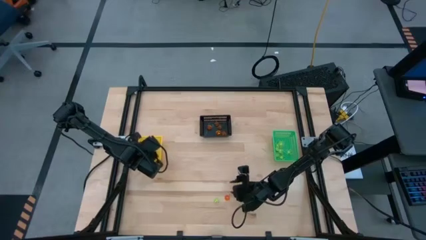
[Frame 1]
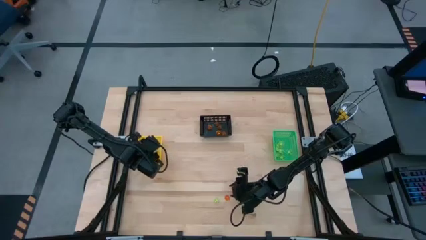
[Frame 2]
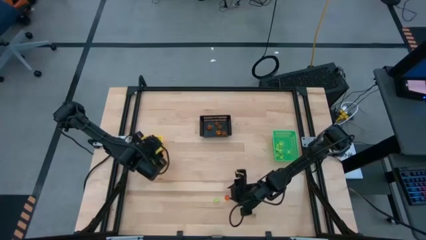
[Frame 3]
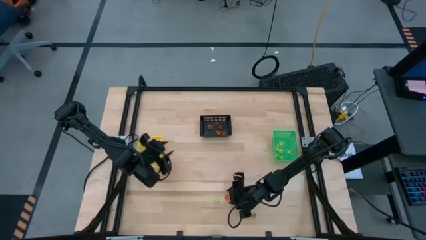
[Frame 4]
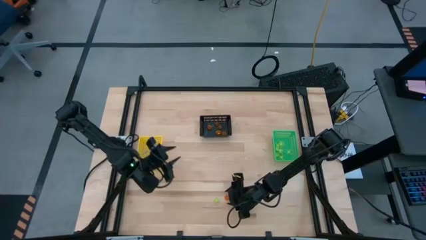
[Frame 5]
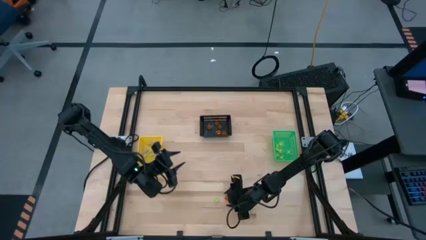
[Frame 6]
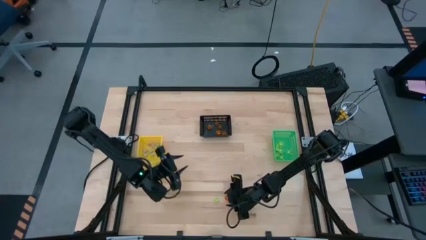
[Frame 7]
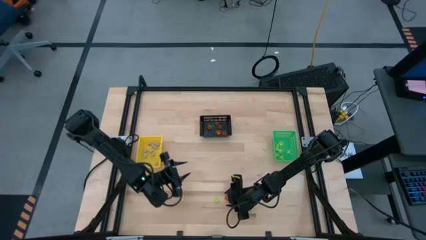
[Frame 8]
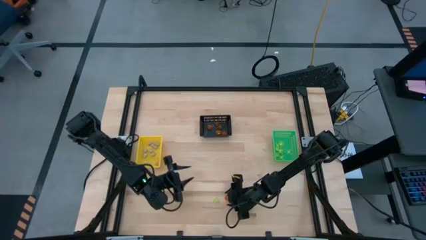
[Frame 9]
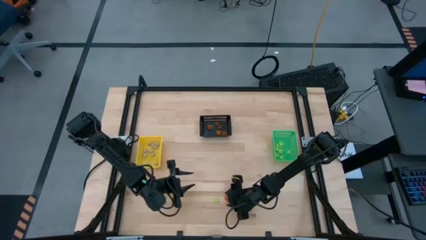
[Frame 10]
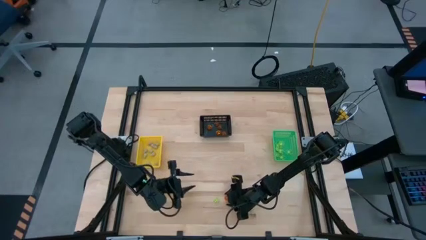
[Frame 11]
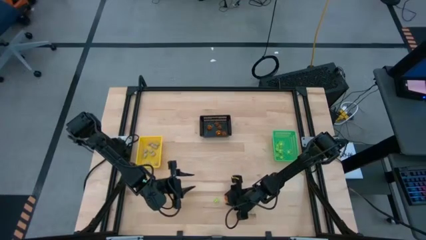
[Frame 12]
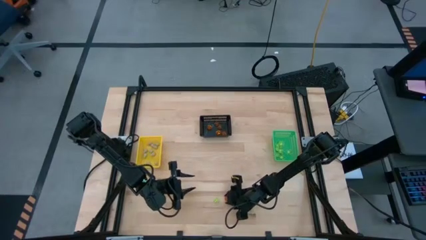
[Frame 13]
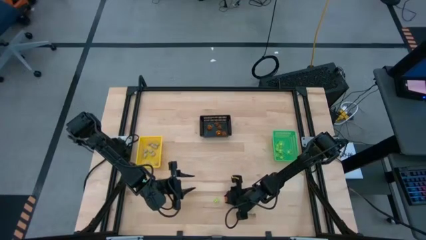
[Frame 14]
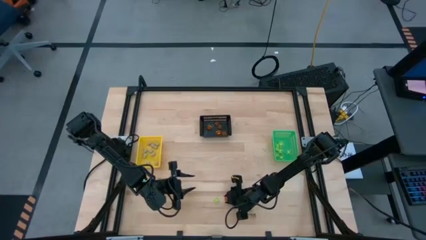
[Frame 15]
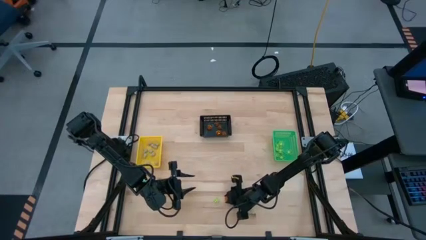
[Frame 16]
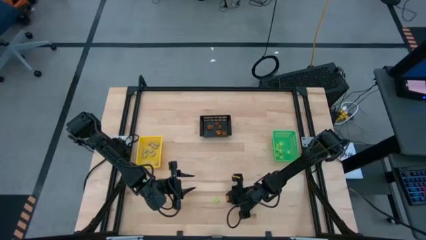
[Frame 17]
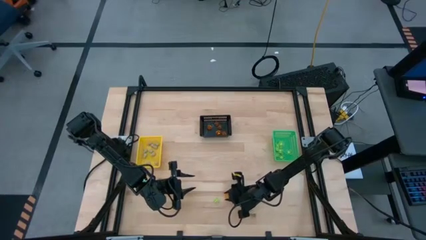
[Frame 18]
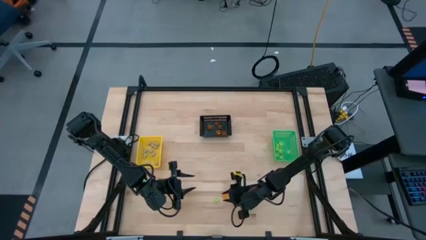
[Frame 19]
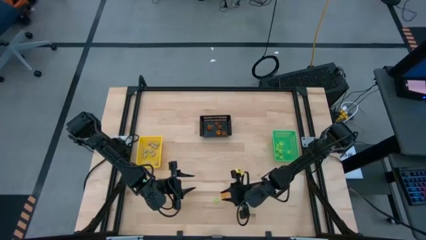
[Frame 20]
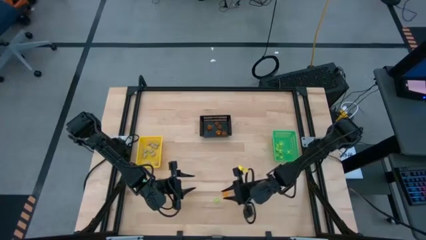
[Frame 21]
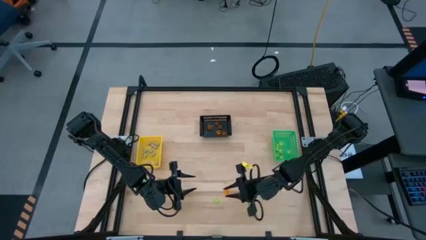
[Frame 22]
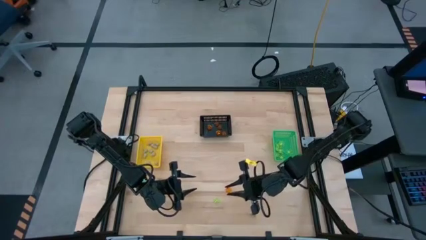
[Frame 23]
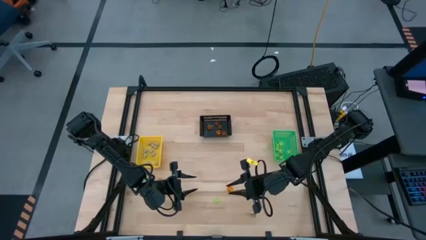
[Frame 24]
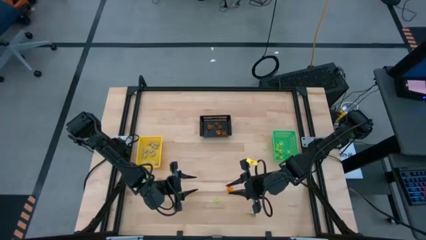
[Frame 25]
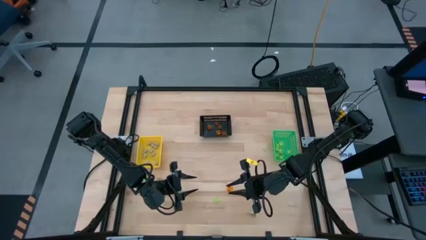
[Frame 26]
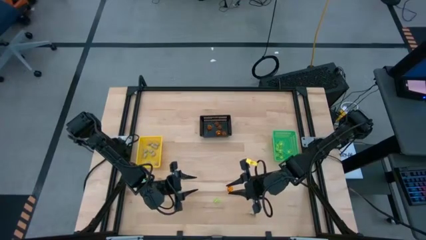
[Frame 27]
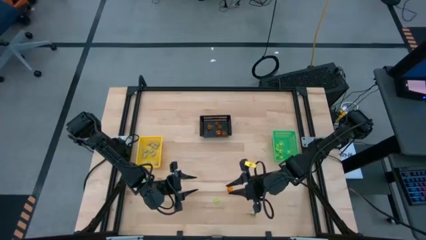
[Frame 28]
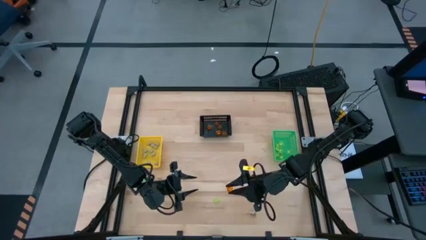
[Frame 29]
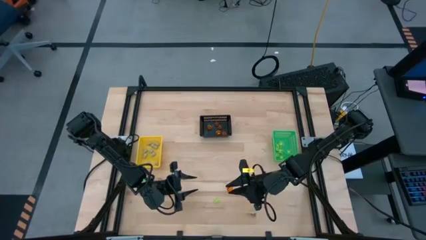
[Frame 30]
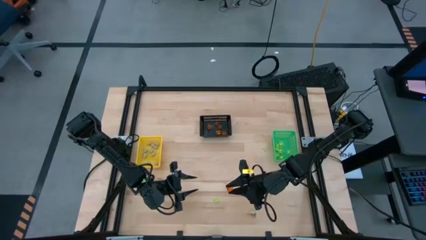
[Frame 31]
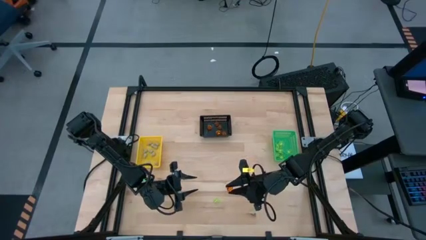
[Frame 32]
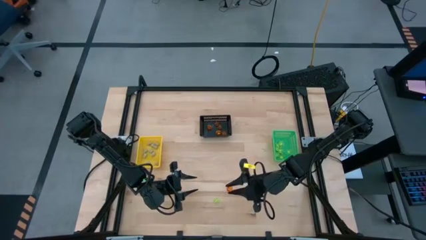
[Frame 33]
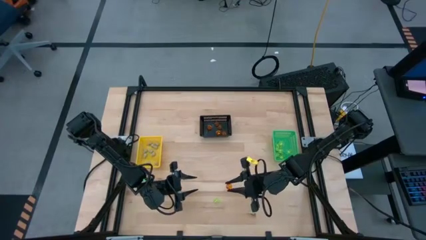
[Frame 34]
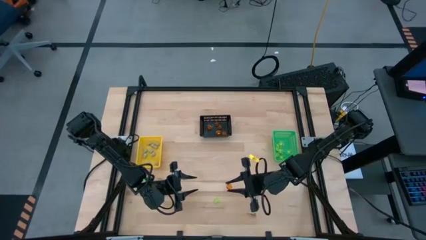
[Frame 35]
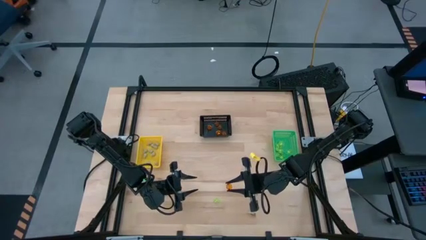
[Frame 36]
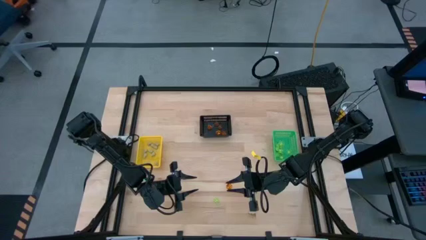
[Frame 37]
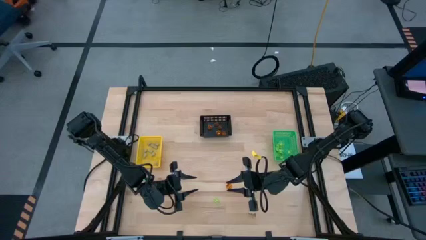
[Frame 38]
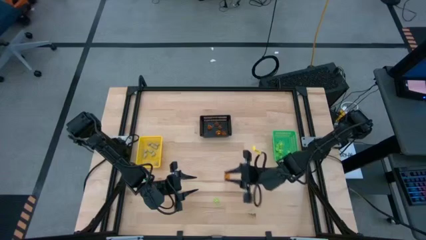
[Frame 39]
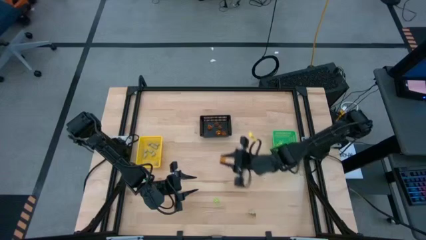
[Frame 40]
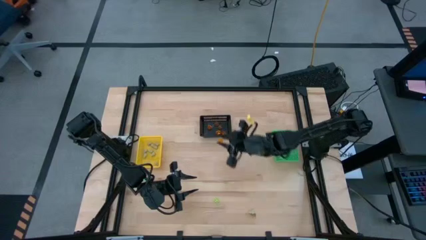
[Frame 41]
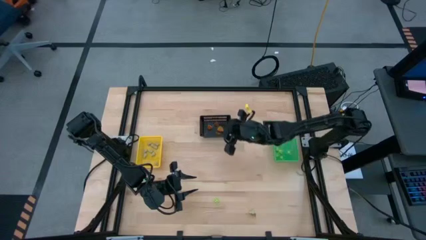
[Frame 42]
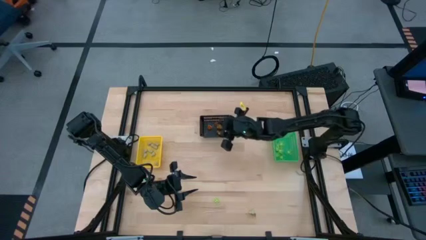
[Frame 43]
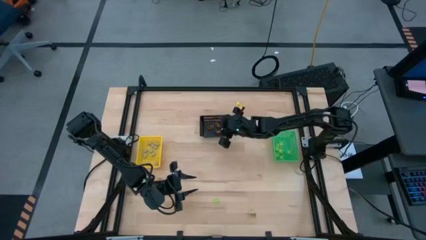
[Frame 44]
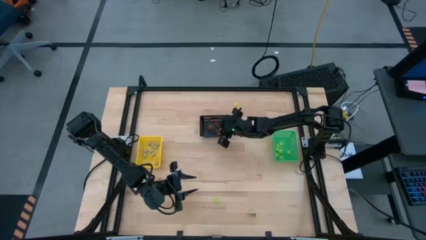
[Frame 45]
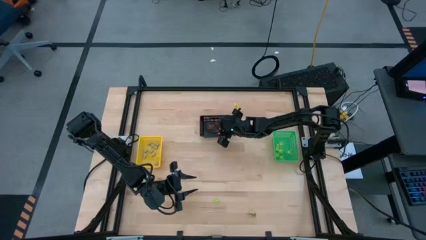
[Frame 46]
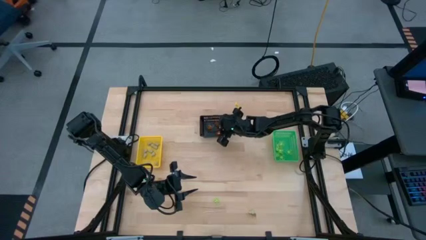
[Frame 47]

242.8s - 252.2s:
Task: Sort Halloween decoration
Put the orange pumpkin toy into the black bin

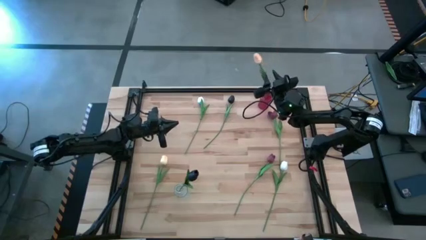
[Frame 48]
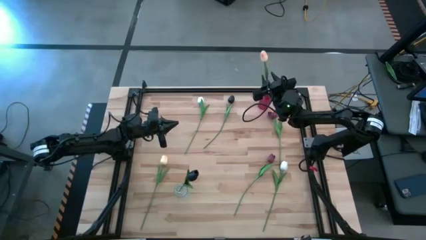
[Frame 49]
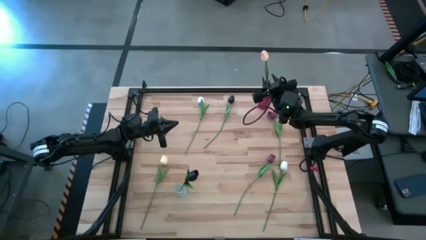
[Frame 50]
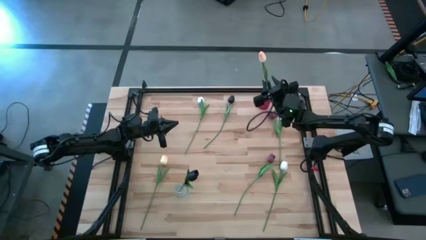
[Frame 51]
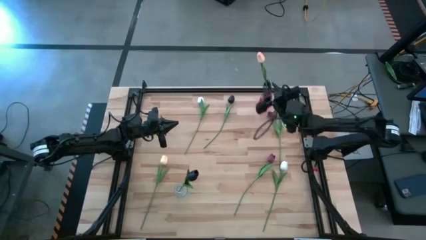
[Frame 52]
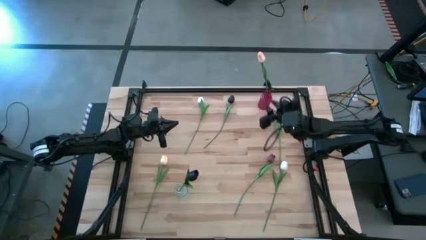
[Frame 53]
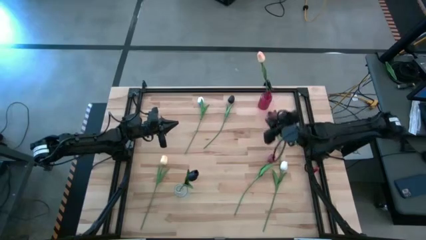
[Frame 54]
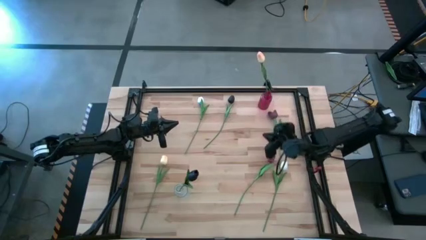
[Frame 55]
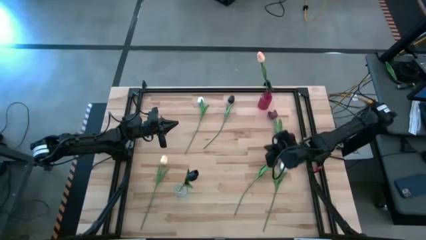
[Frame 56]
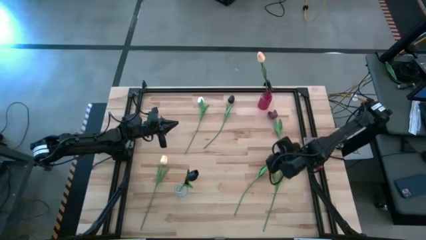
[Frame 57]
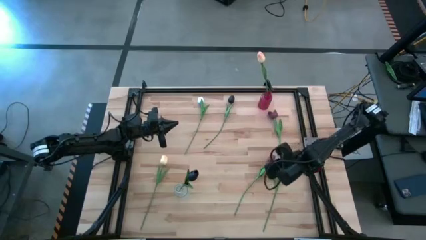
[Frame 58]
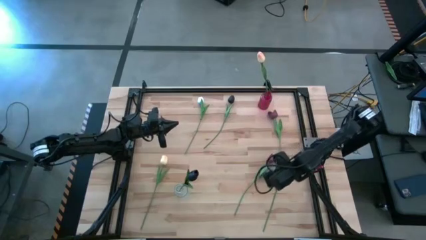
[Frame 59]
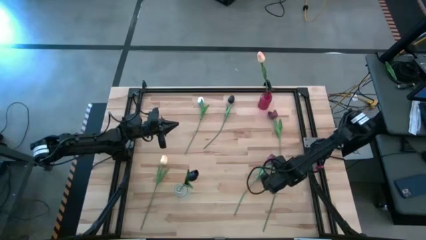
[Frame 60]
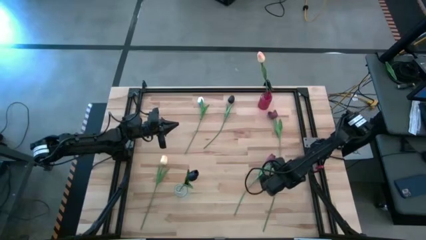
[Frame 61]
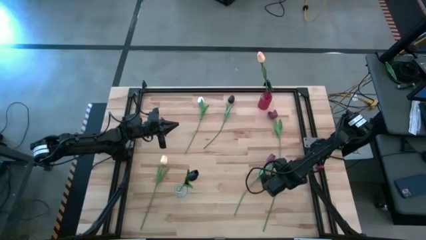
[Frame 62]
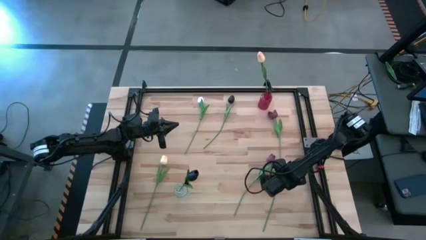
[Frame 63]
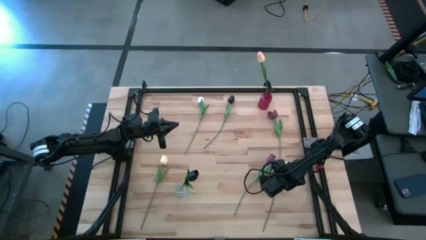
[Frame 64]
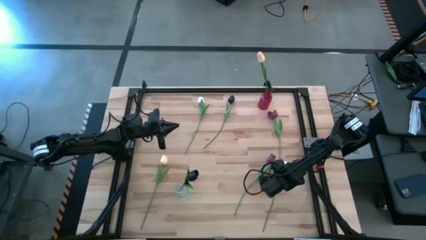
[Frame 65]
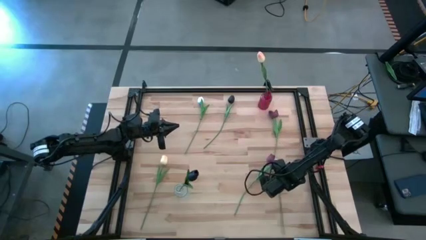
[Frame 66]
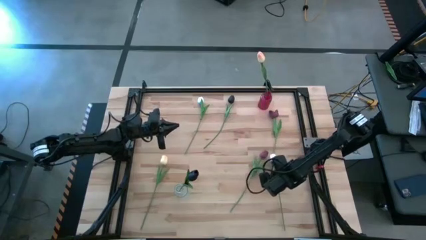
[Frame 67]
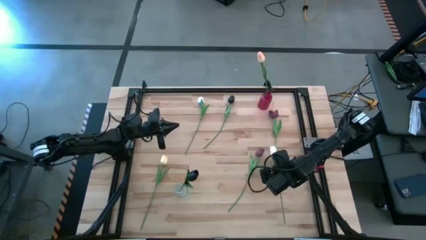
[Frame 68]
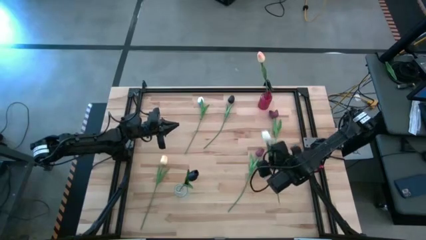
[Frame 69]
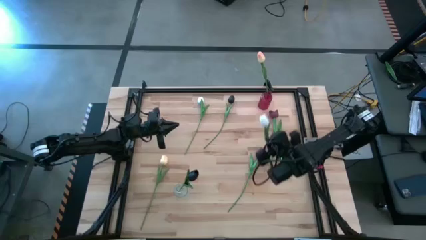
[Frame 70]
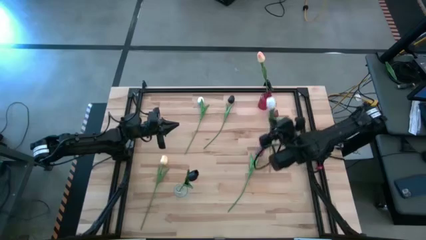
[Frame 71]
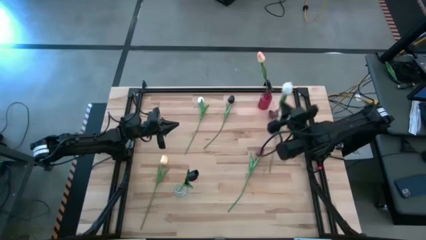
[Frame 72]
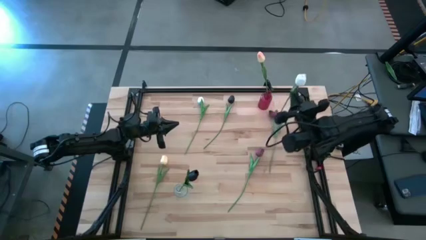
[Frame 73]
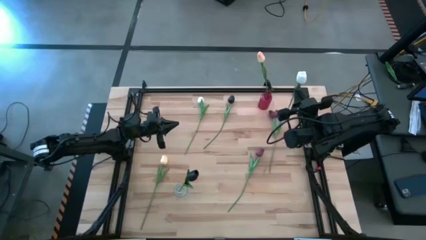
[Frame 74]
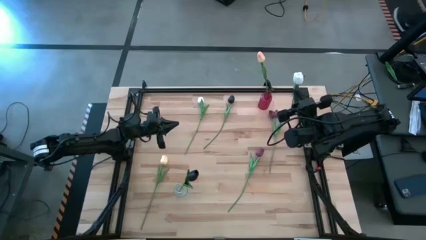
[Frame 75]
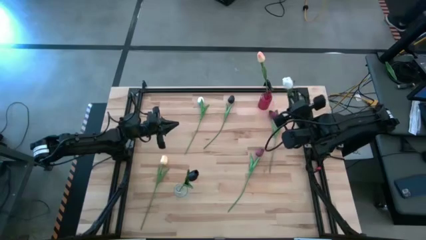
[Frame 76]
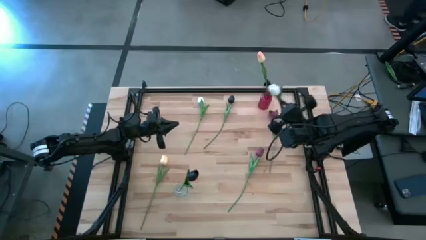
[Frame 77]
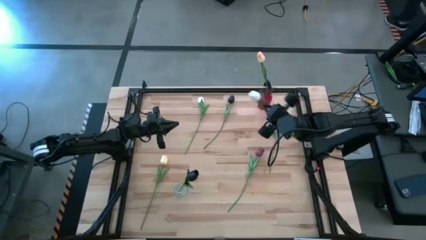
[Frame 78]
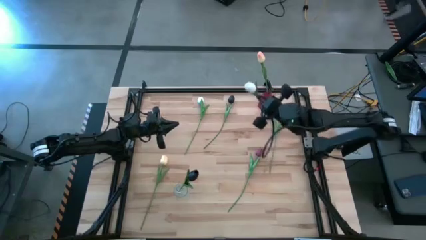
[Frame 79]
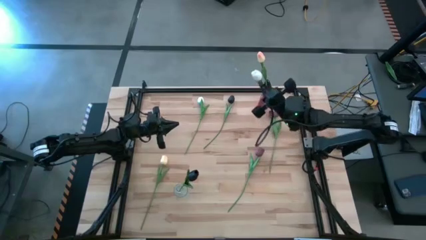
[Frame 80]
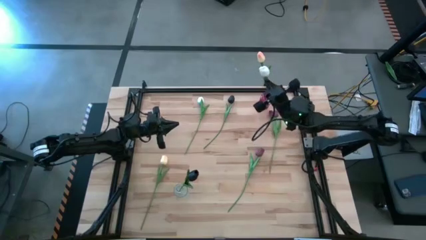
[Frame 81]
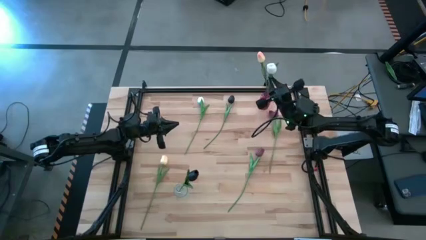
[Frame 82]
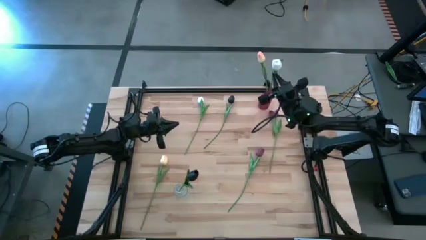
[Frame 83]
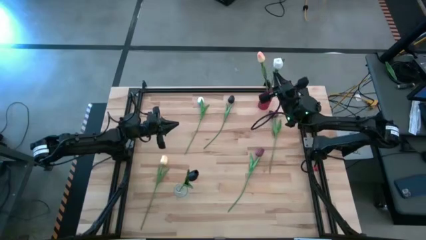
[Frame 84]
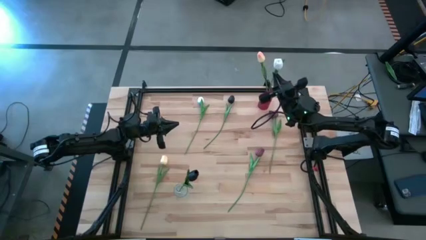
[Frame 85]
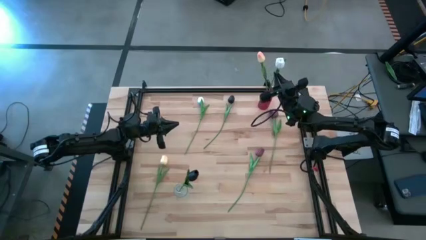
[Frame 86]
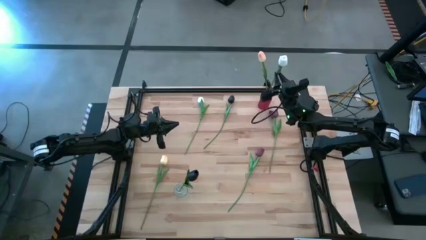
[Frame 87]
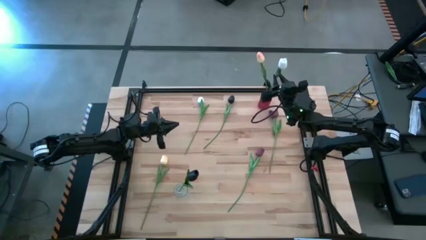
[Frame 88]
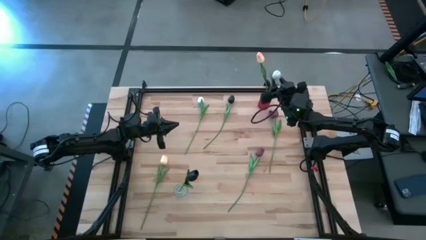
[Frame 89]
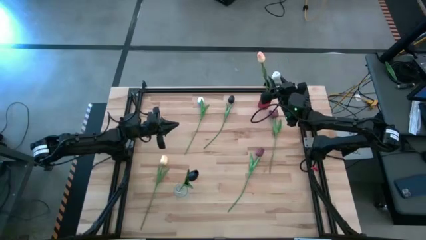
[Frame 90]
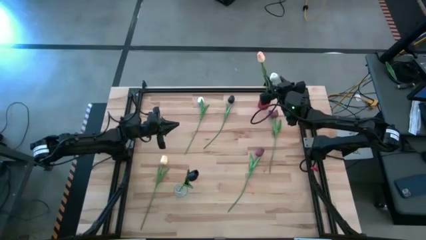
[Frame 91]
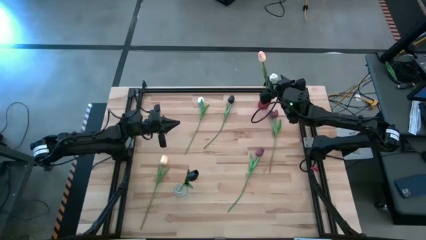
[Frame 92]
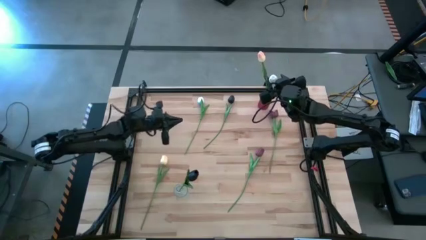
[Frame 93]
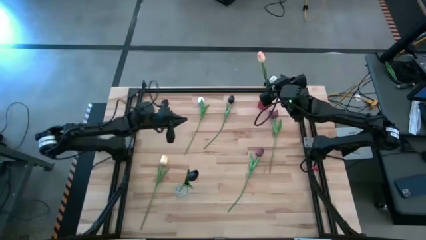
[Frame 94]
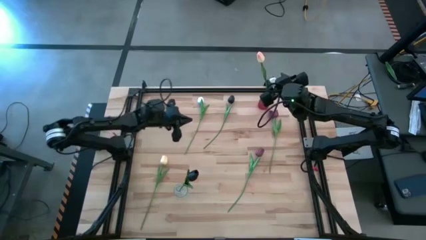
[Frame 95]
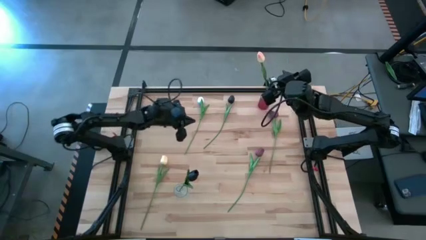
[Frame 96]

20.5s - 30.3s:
Task: Sort flowers into vase by color
Put the bottom white flower into the red vase
